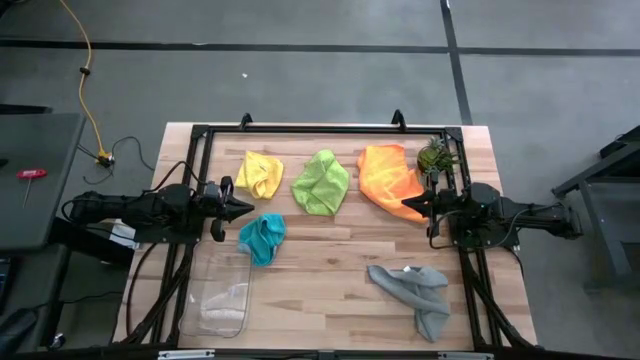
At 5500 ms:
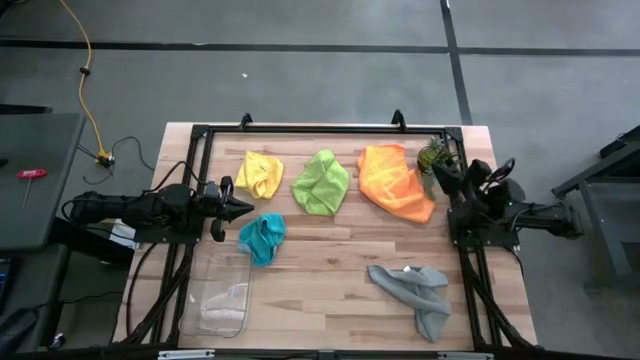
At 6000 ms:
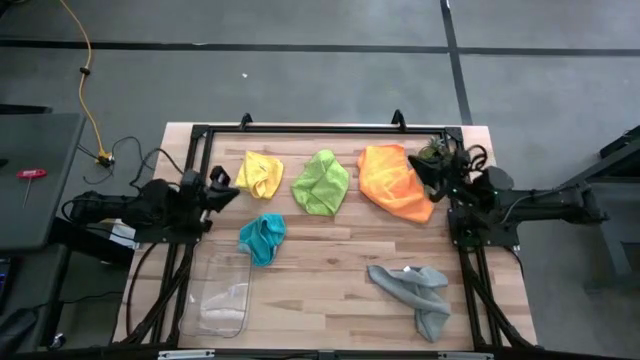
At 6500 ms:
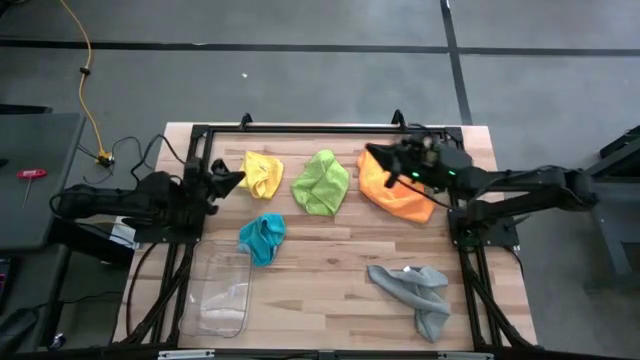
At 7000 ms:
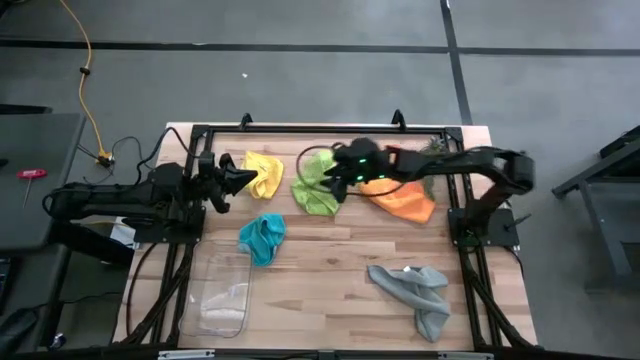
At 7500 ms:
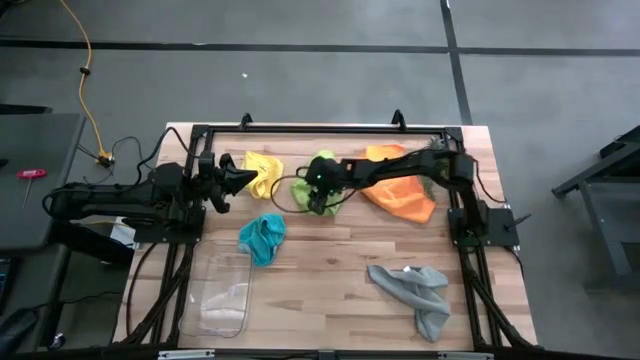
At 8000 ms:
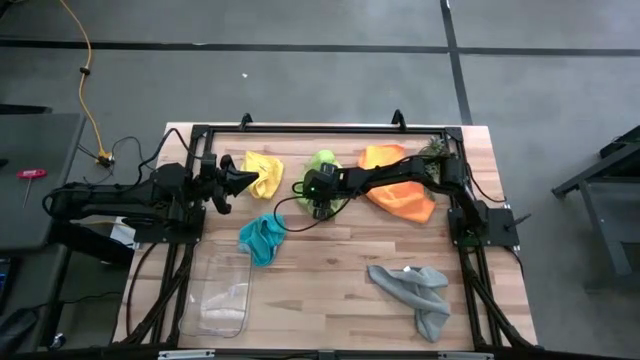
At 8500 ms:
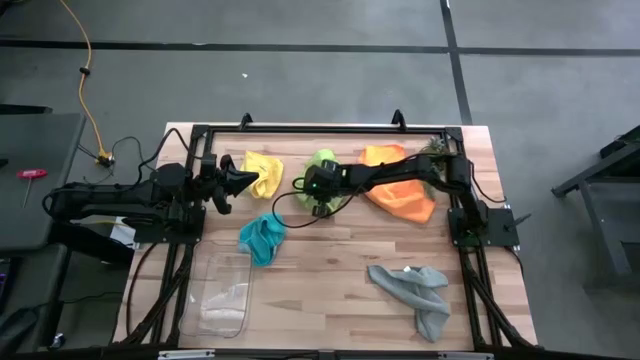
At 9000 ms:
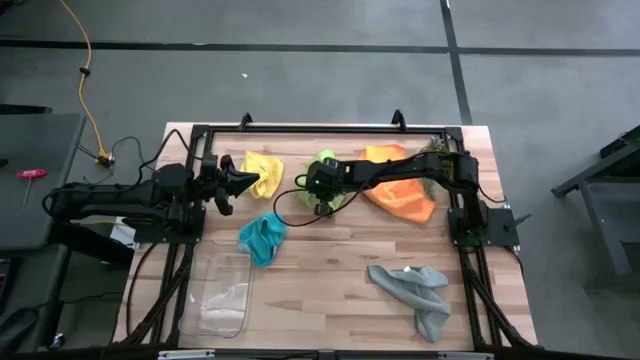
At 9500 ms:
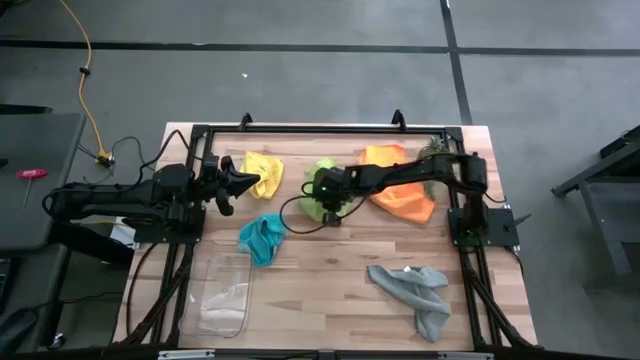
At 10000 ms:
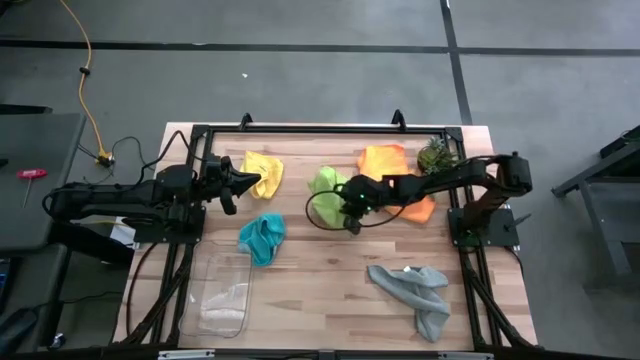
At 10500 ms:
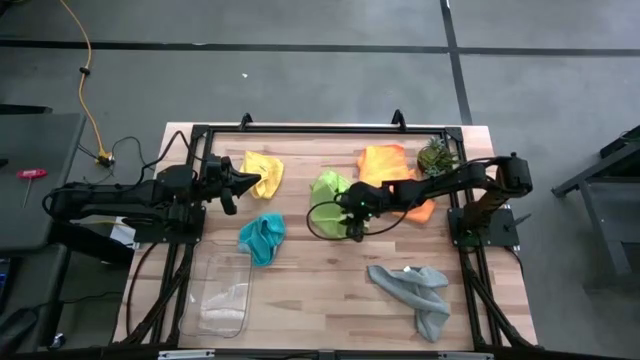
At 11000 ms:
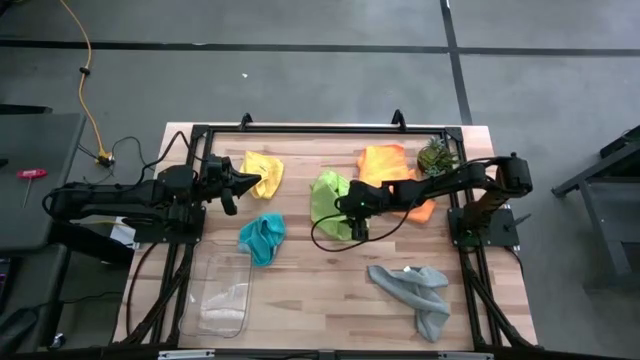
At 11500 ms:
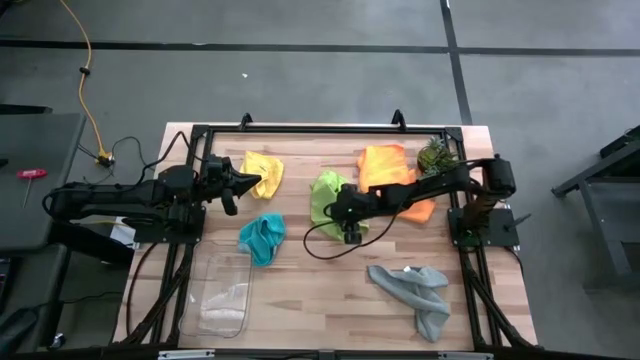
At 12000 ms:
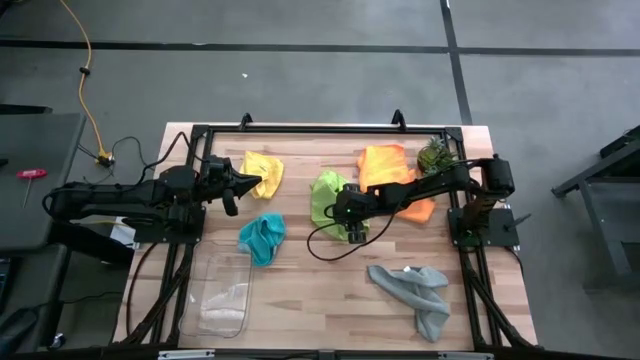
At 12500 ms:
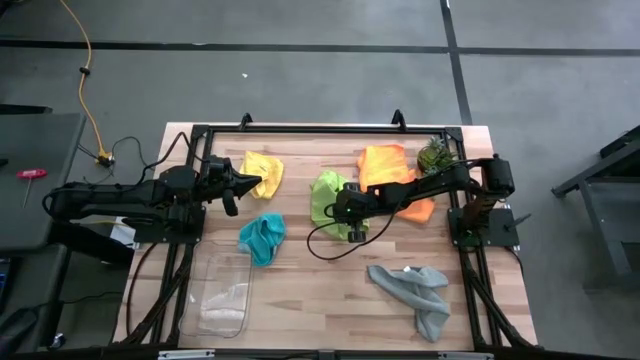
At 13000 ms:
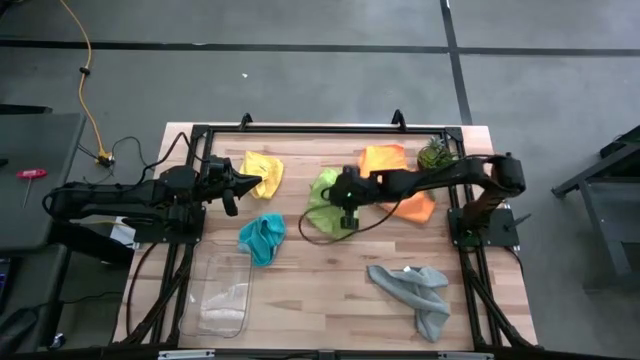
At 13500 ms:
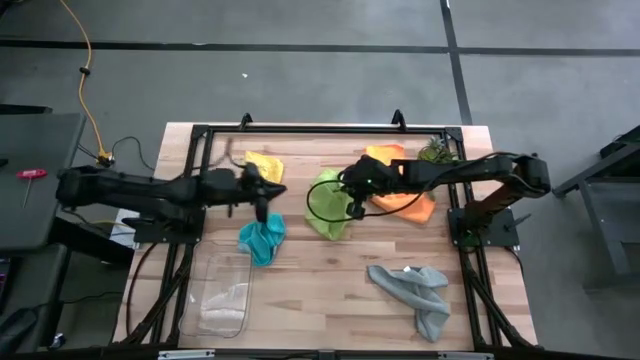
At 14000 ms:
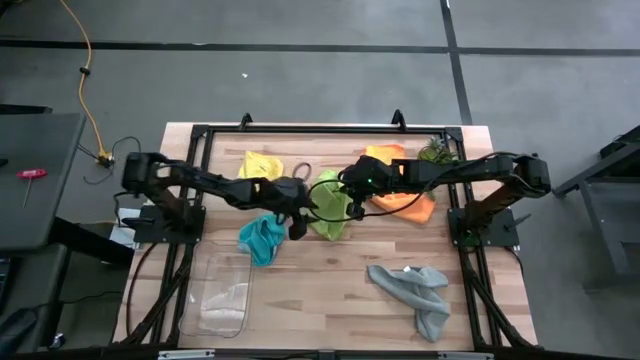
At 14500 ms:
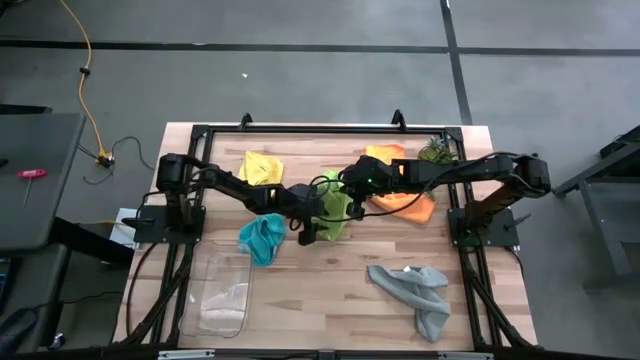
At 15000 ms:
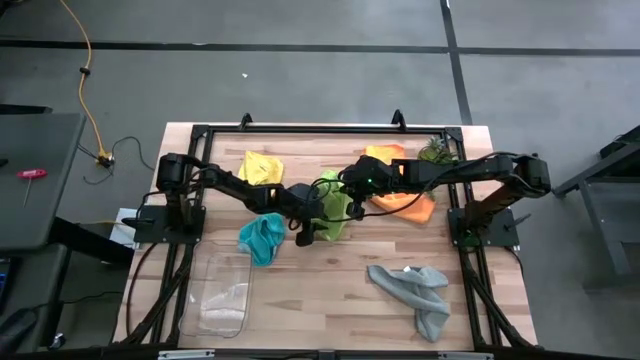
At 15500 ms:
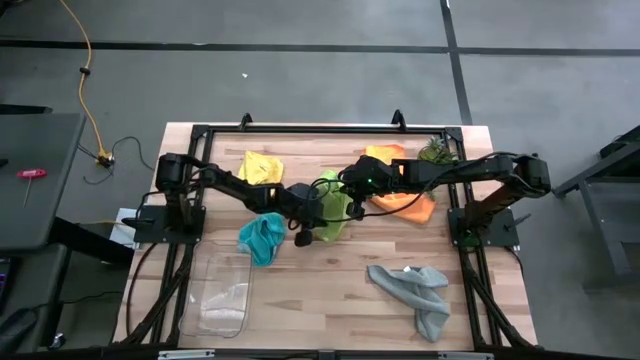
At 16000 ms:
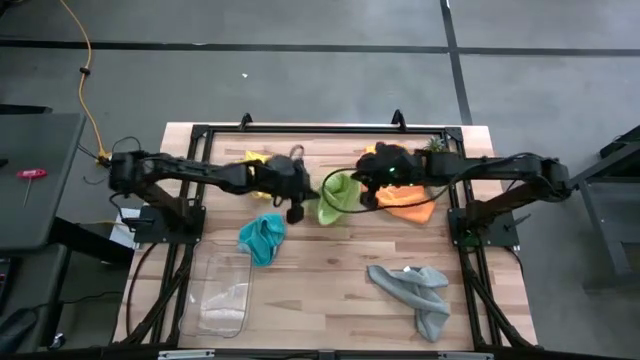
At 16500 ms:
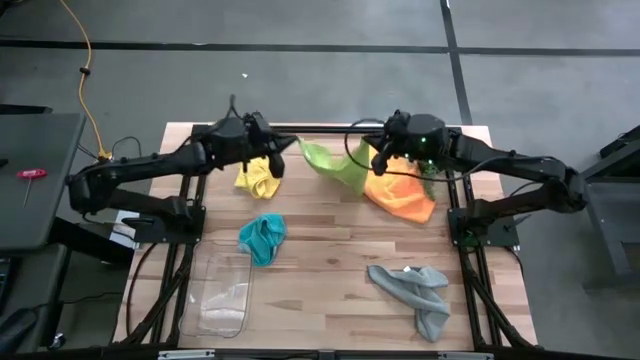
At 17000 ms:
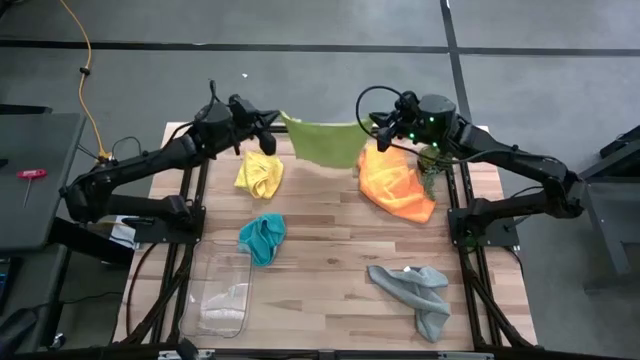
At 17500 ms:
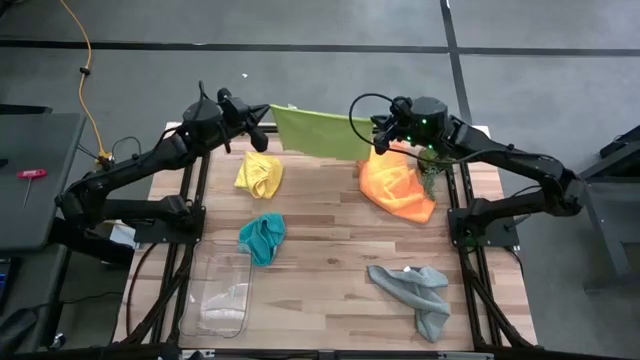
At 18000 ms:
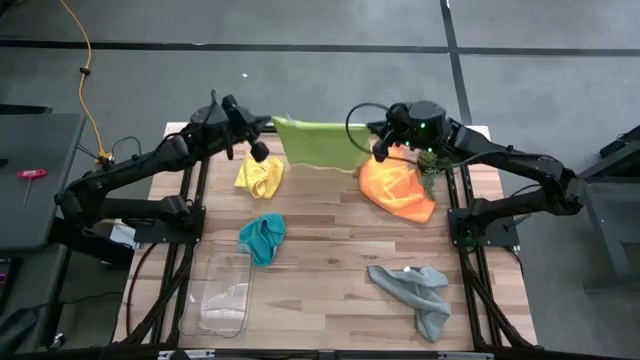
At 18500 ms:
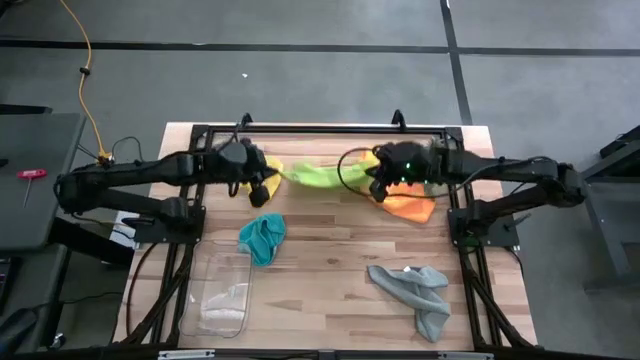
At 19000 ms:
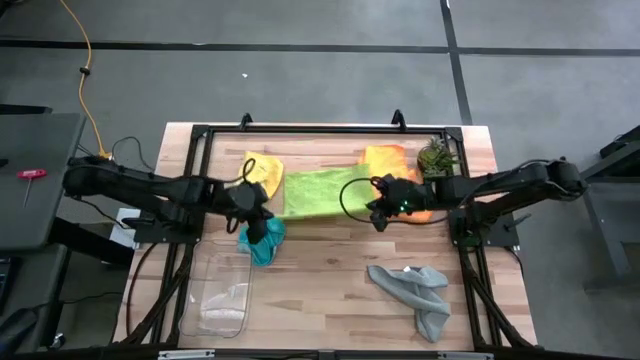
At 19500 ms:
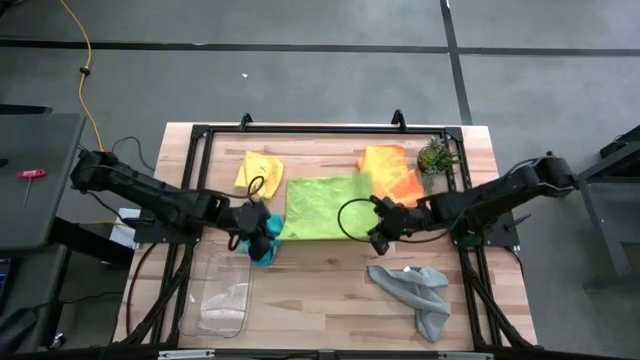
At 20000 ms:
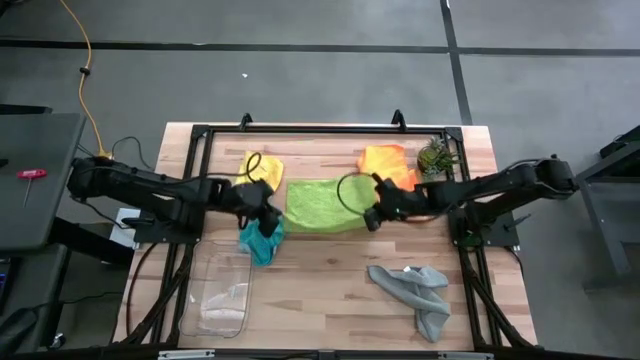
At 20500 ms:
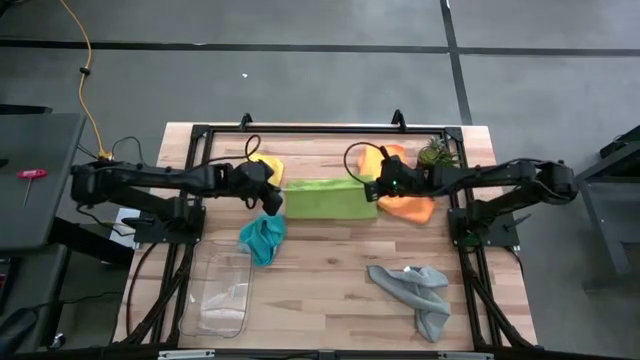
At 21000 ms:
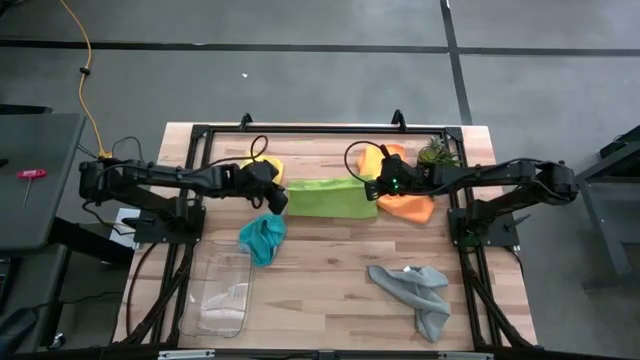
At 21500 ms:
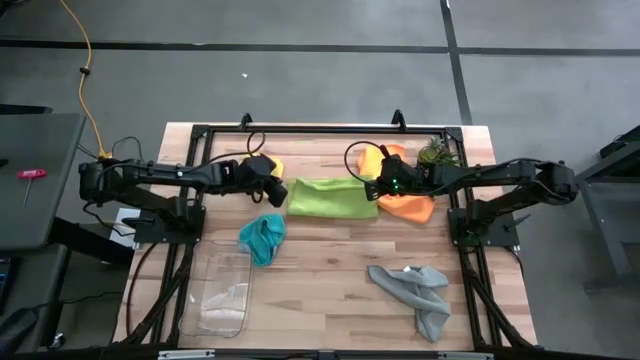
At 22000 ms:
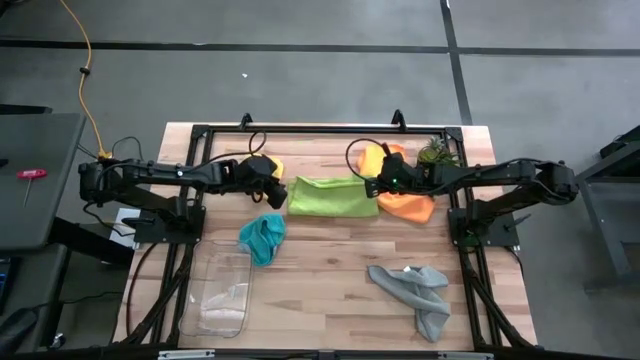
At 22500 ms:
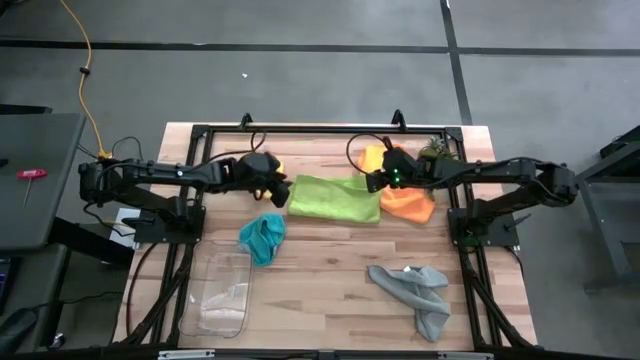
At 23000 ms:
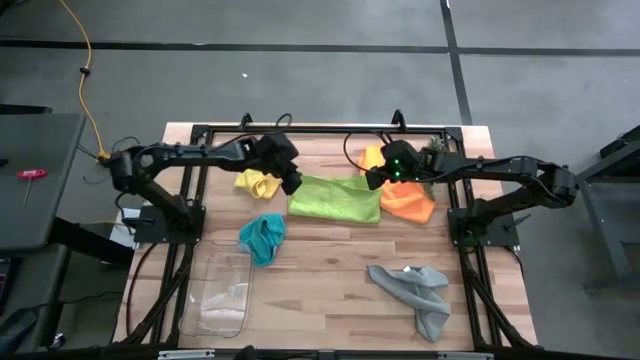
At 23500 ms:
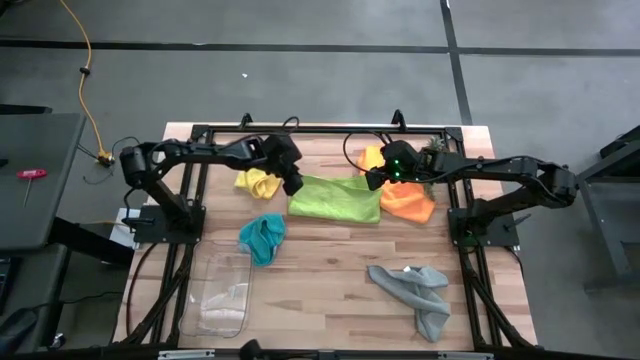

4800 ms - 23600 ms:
Task: Fold microfiber towels
Fold the green microfiber towel
